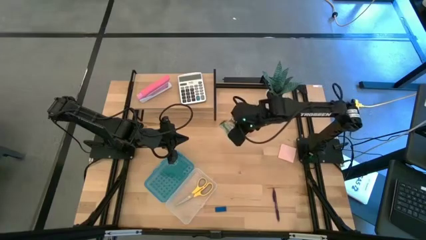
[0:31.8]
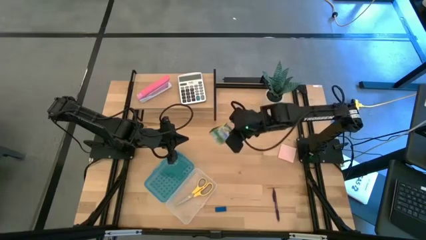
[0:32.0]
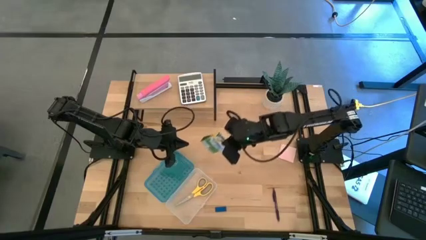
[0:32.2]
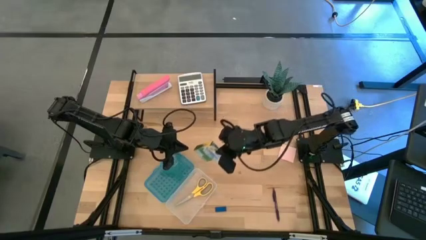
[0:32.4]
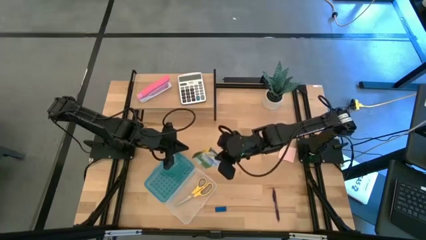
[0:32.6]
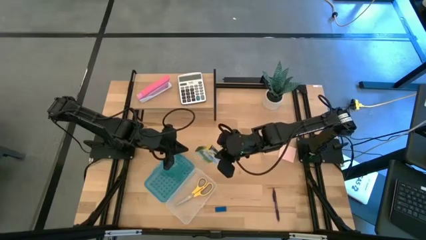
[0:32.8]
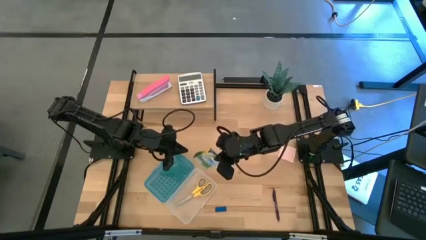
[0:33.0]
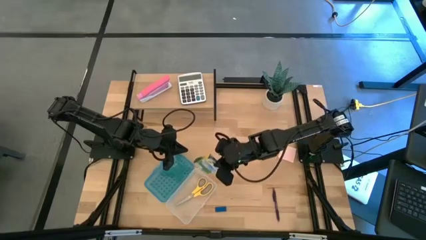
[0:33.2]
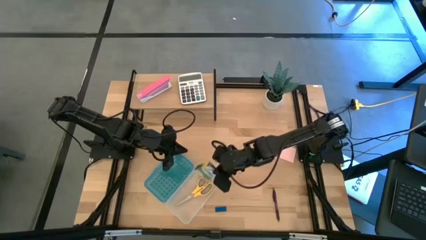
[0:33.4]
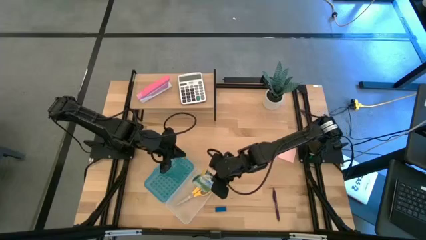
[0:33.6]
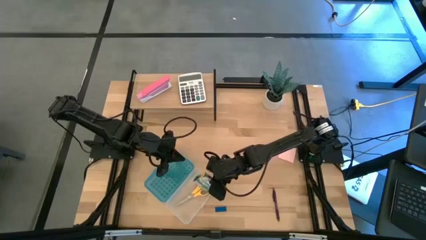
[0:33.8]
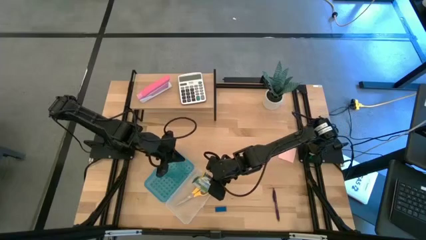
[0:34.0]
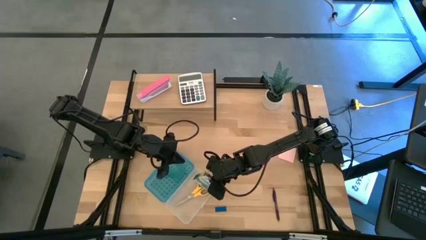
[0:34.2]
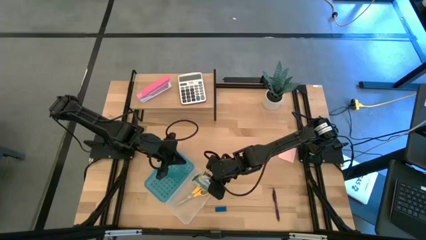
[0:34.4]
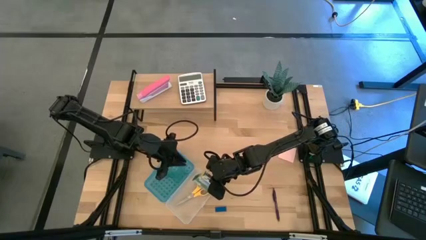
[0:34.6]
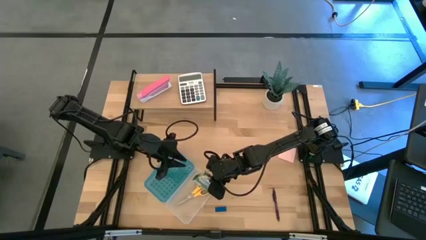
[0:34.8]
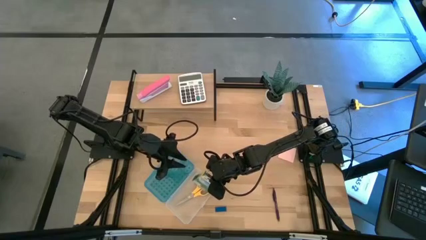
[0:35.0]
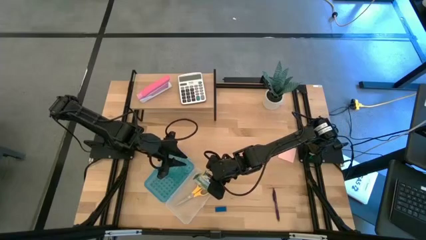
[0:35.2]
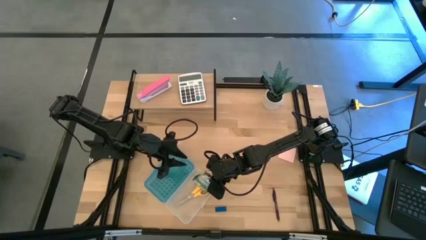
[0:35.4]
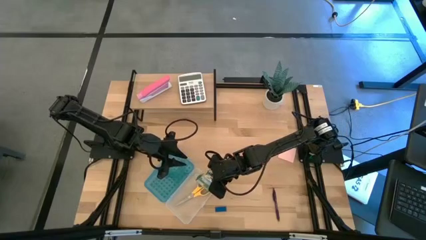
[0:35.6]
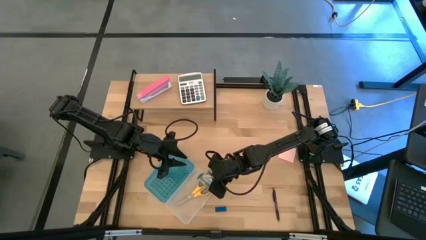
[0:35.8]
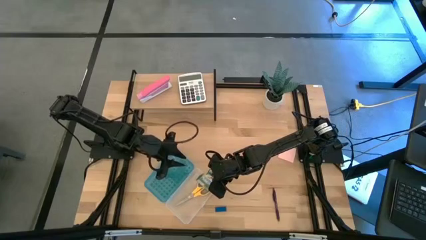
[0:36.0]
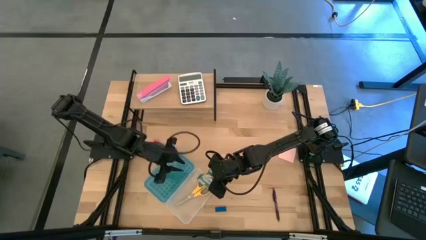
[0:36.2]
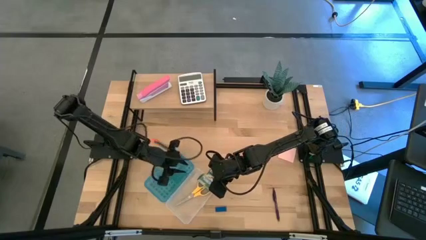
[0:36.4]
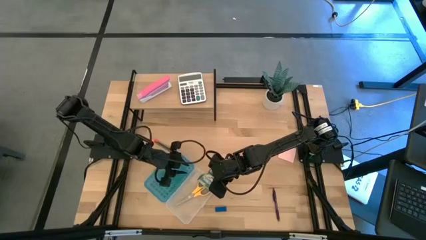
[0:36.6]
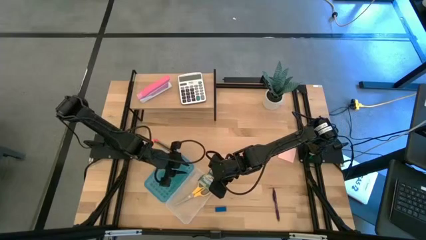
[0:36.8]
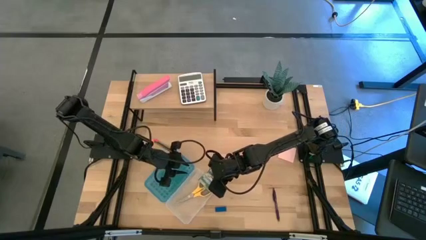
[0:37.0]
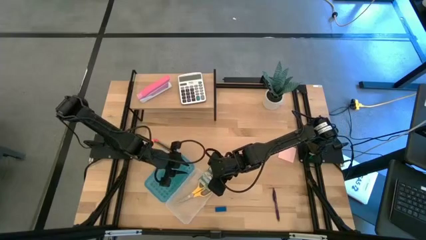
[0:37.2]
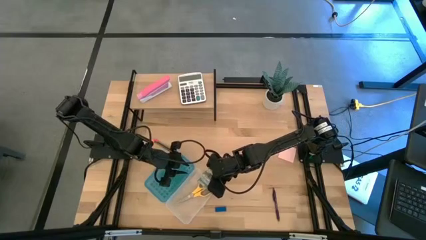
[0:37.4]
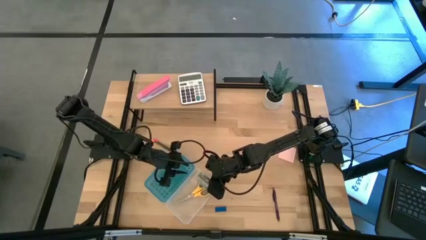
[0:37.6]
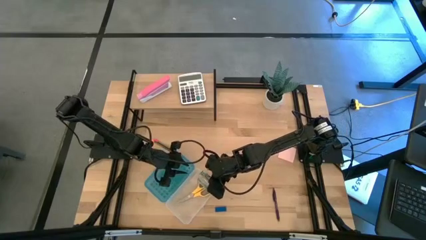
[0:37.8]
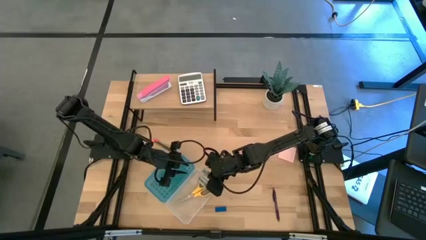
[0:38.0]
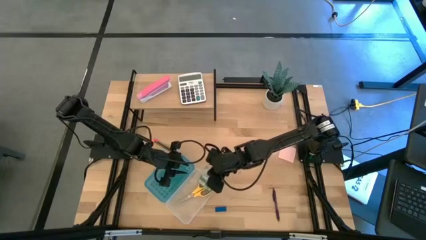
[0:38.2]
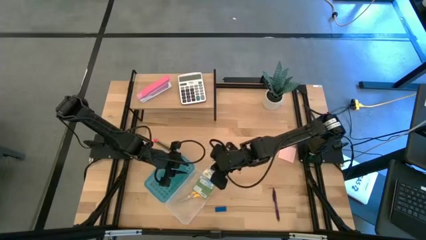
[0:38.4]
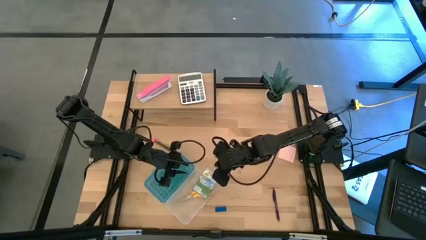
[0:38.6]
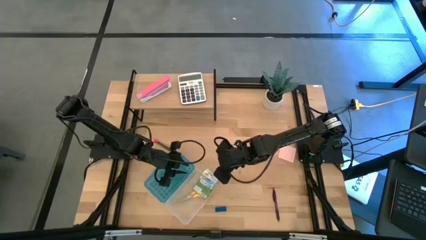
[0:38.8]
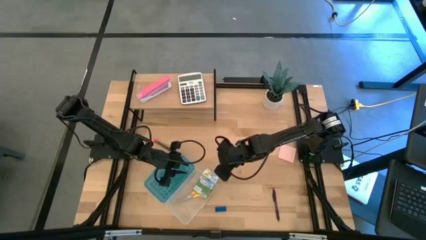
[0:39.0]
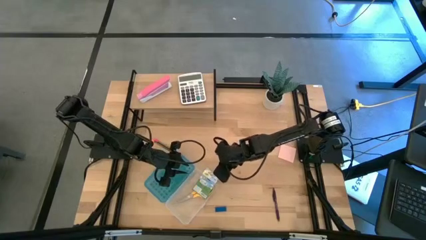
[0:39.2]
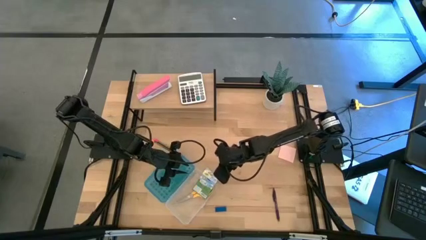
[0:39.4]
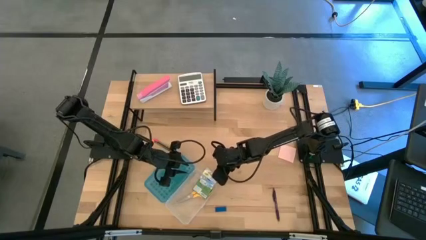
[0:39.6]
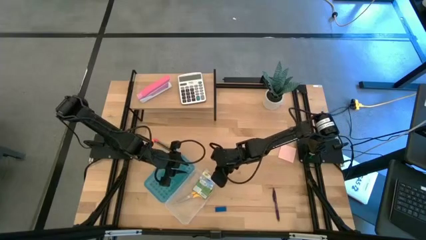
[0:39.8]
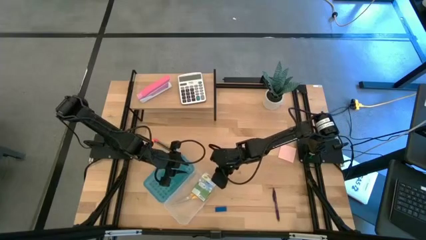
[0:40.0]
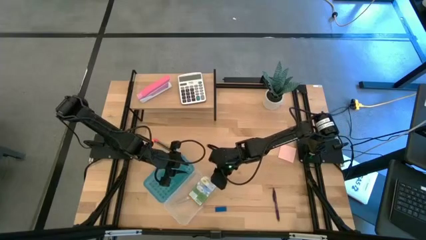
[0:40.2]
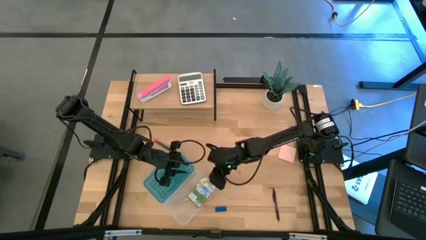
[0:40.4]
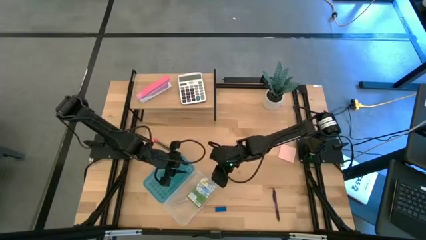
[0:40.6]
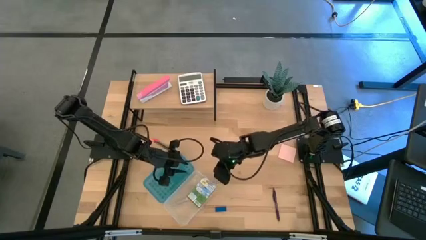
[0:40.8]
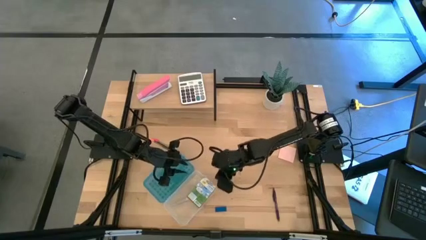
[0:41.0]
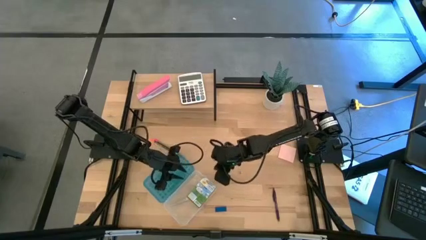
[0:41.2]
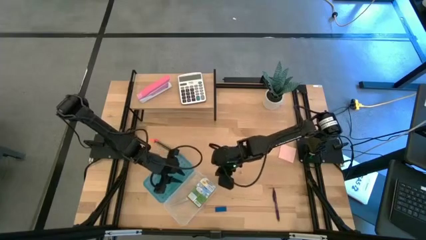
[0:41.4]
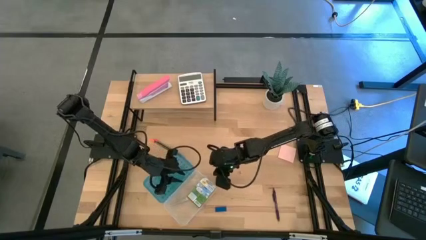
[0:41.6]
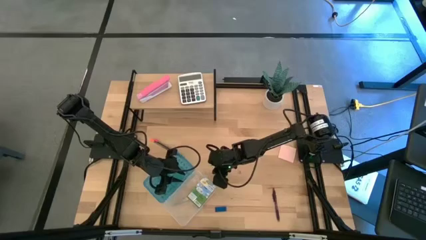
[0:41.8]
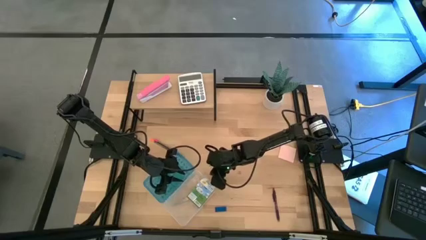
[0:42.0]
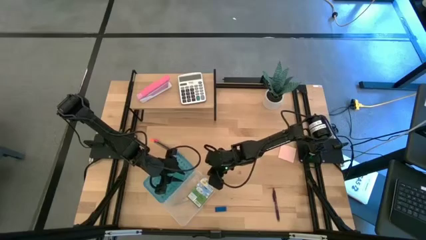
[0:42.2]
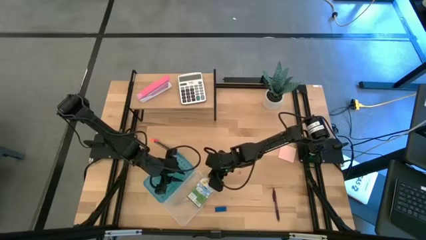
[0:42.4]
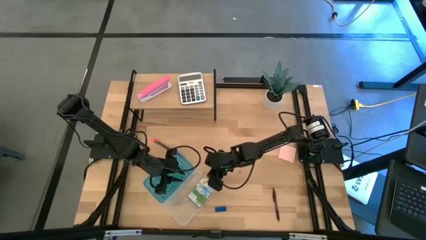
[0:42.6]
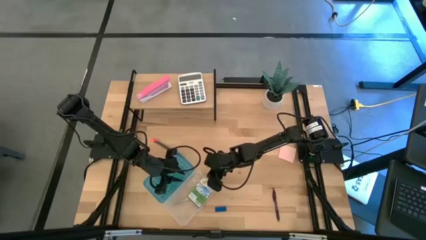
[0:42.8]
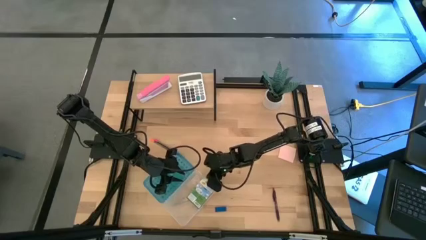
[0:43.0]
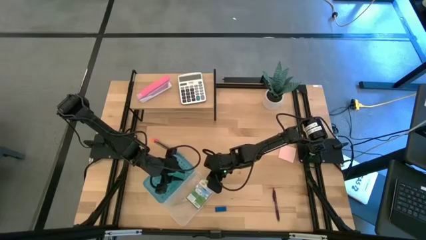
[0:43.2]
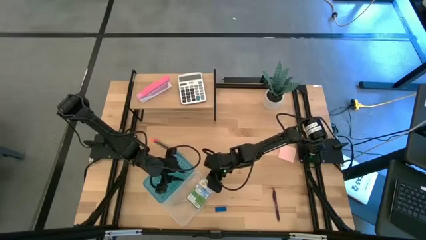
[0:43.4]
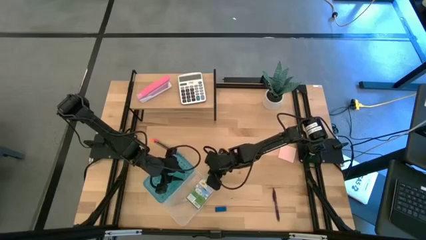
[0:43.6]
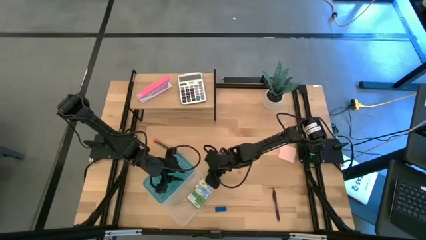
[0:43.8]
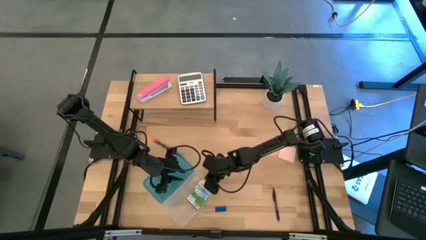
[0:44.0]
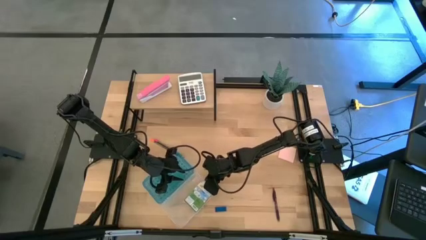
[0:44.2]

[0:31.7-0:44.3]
Task: Pack school essentials
Put the yellow crayon box into the blue supply box
